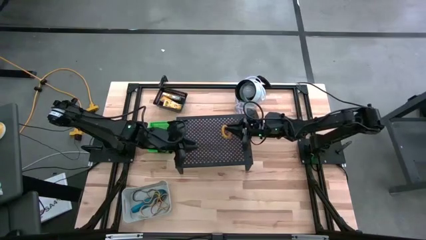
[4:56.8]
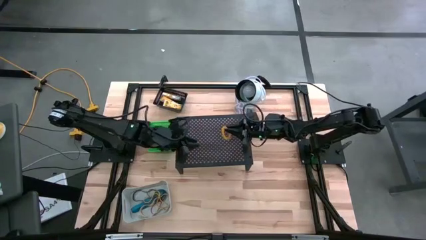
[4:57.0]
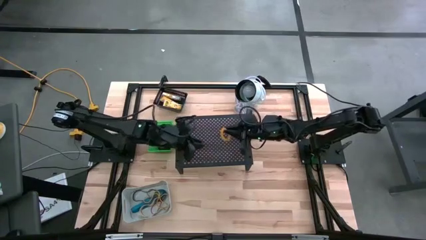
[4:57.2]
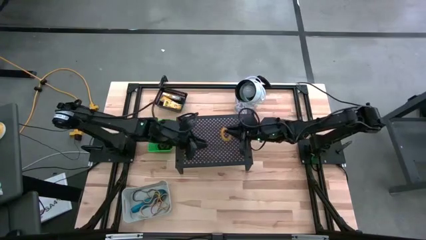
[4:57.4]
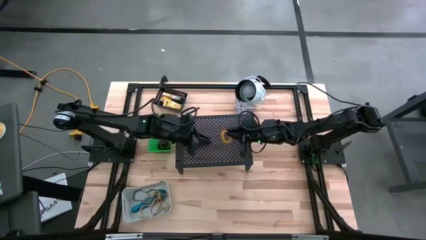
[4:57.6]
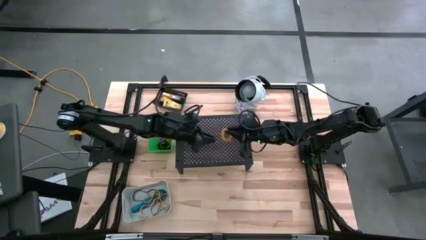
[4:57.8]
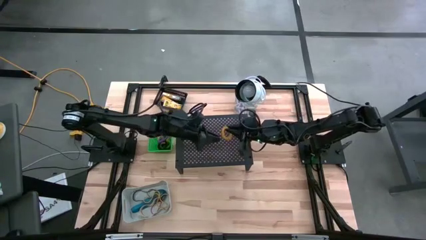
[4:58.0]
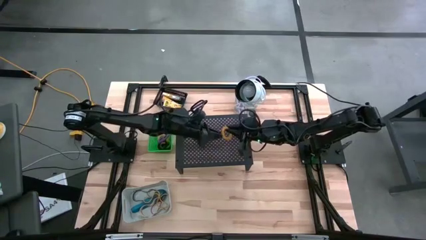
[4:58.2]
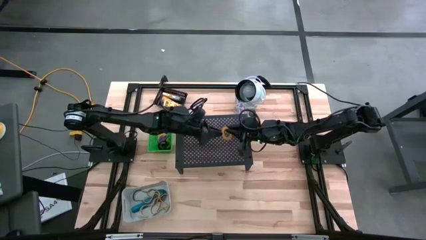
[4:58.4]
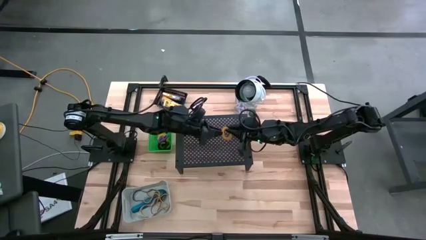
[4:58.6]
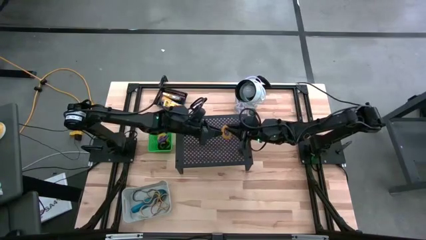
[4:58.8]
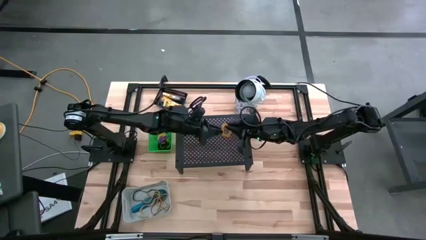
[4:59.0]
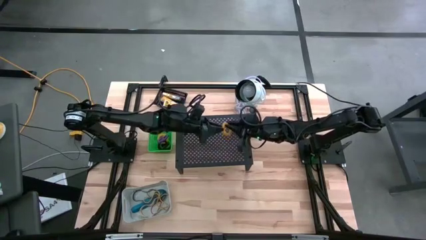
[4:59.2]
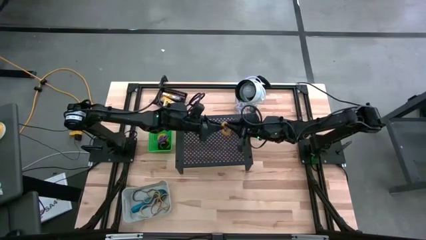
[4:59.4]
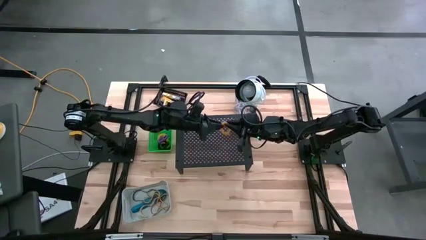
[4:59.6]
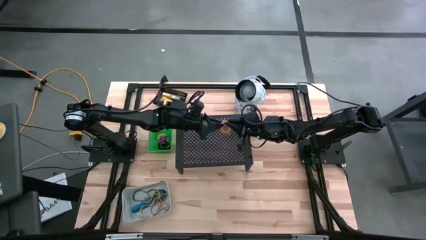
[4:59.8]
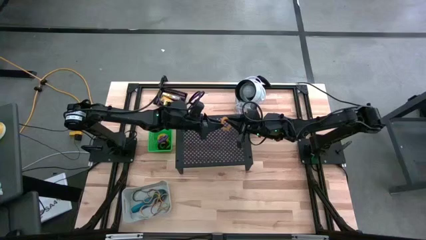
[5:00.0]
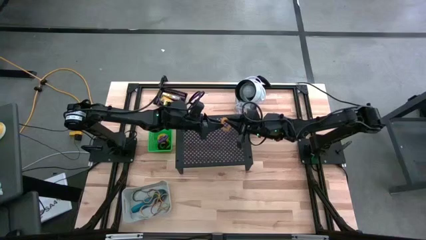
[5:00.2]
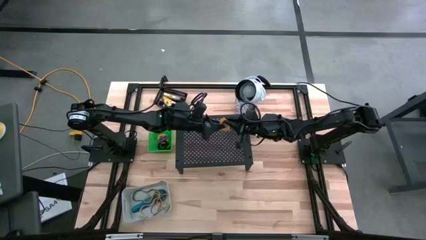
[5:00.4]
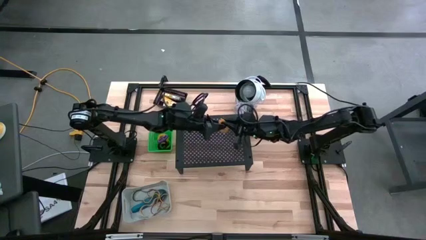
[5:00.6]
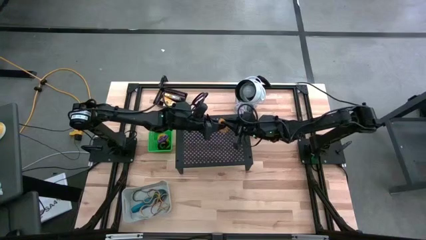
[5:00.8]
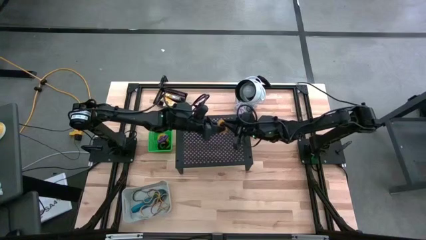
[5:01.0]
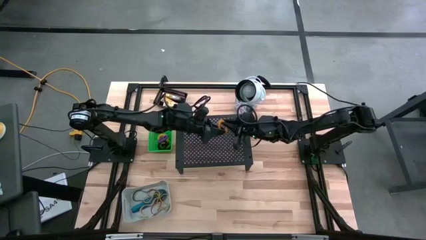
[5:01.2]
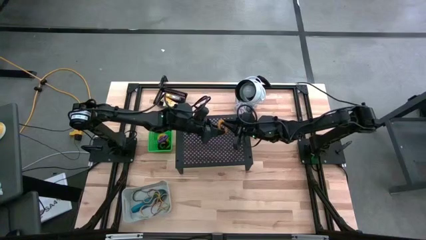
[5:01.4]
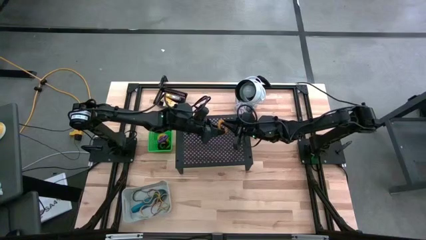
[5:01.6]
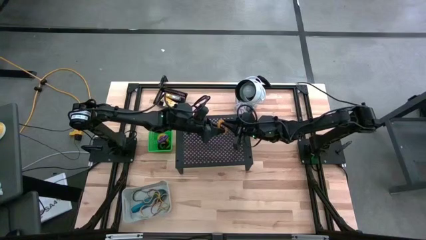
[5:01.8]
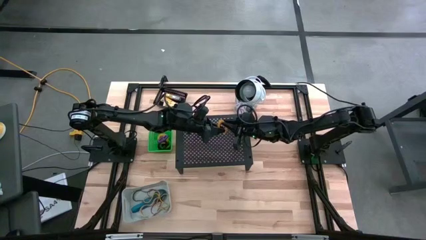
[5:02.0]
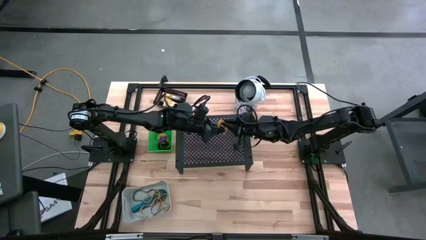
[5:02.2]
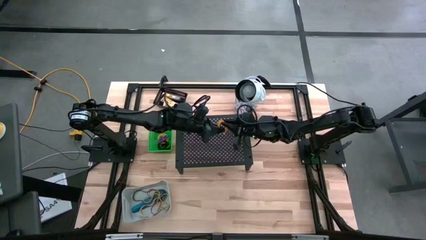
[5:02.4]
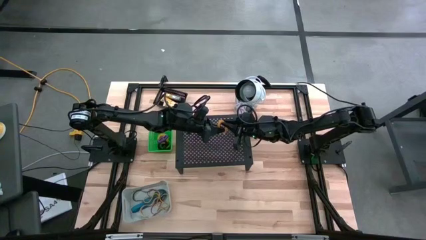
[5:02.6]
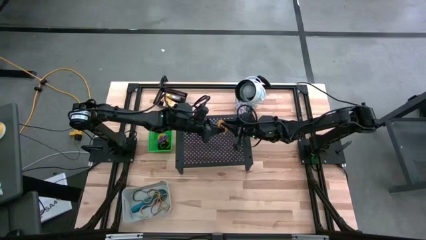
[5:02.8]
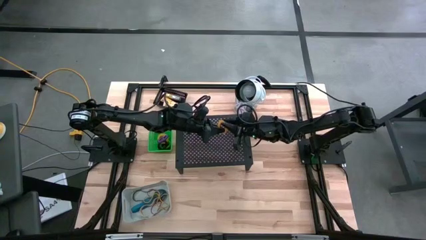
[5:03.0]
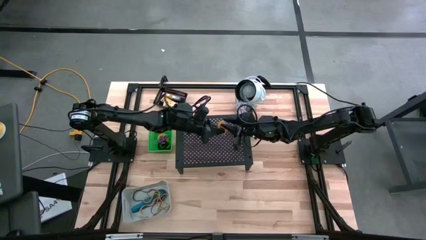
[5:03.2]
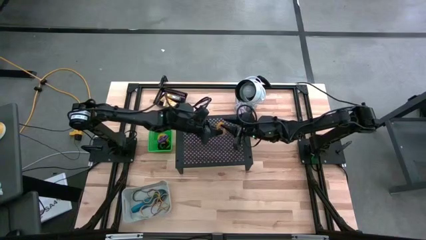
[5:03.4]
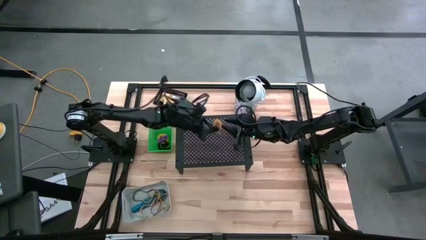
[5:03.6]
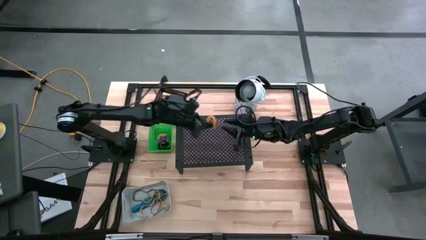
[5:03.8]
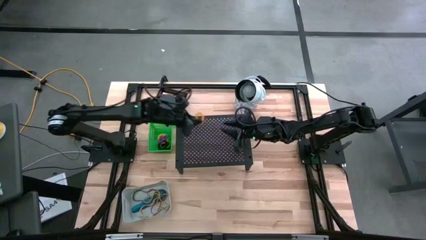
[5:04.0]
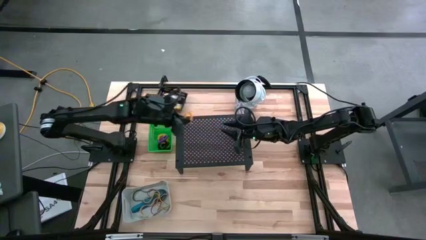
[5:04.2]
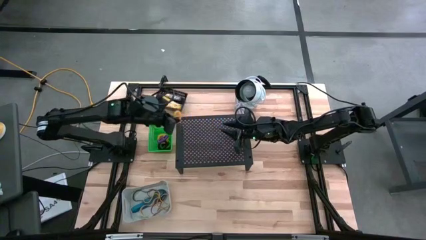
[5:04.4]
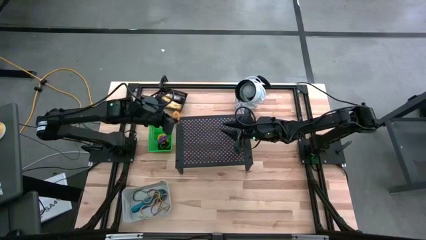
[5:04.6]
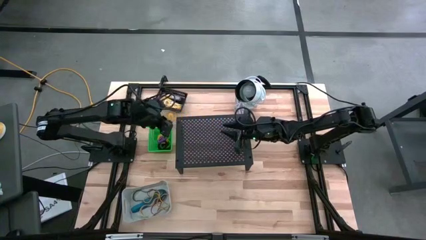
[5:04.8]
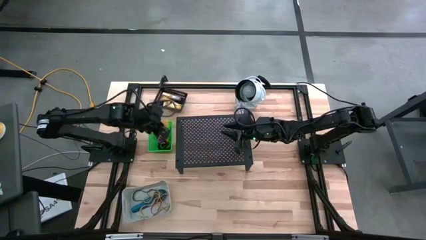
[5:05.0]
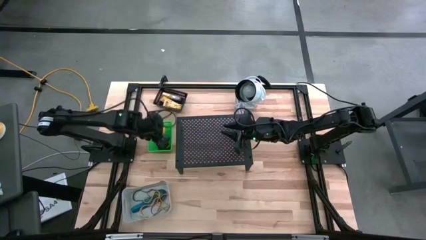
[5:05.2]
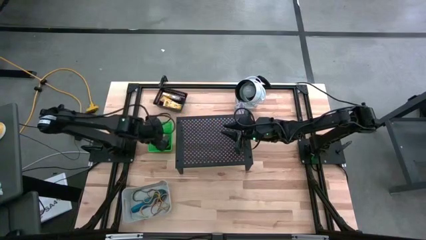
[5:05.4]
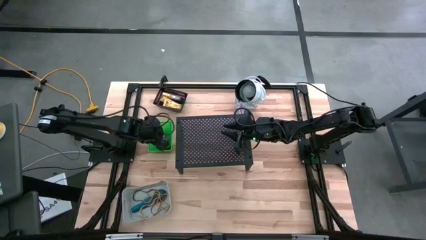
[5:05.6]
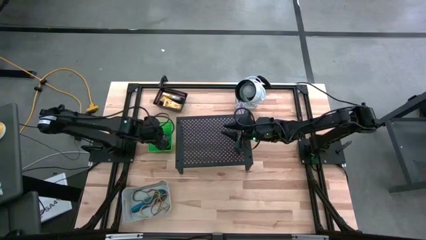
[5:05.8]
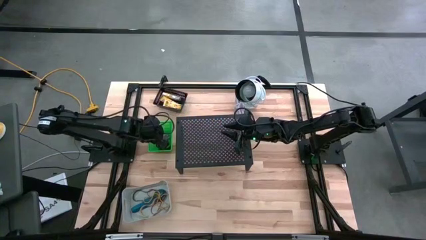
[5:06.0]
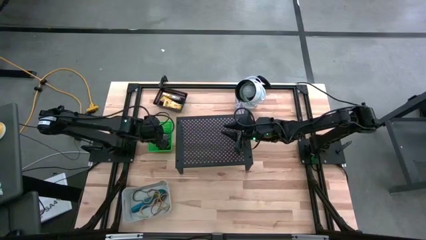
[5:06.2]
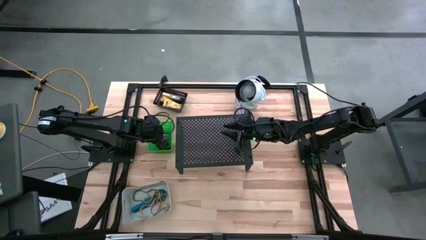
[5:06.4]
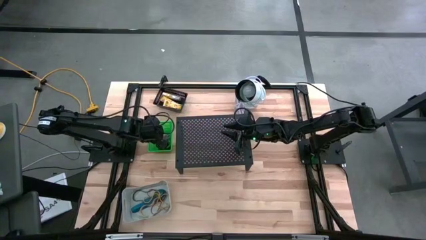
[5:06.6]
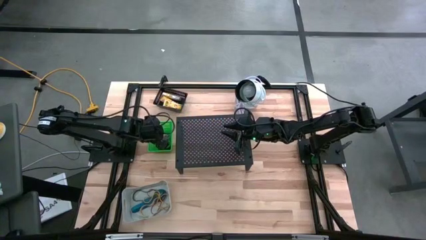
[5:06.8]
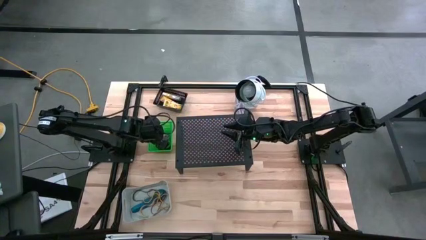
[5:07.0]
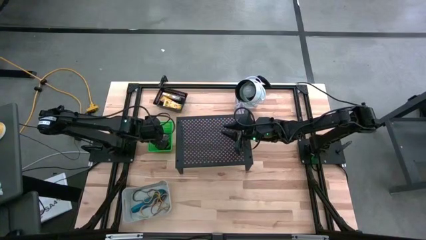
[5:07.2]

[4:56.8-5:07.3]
Task: Pick & Place Office Desk Supplies
Put the yellow spring keychain into the green bin

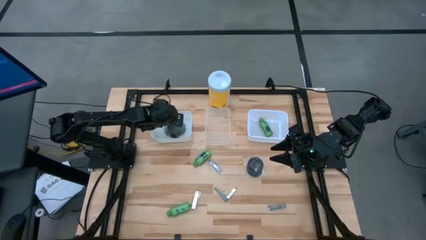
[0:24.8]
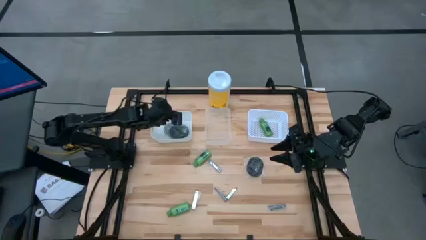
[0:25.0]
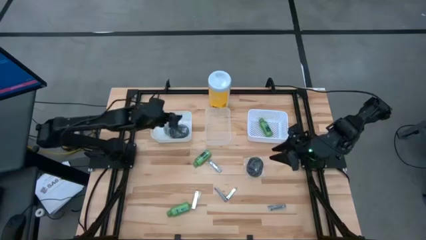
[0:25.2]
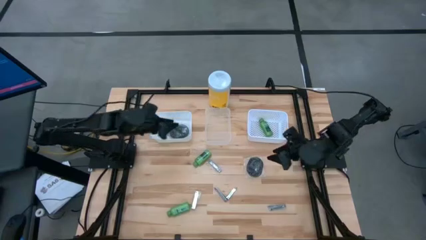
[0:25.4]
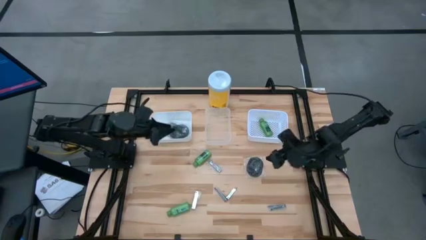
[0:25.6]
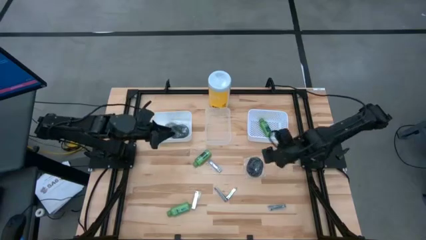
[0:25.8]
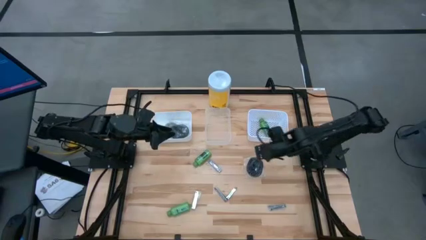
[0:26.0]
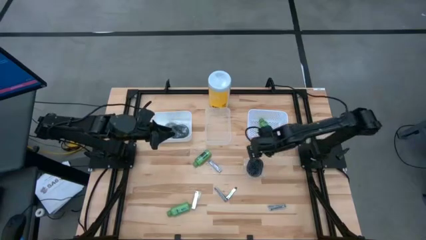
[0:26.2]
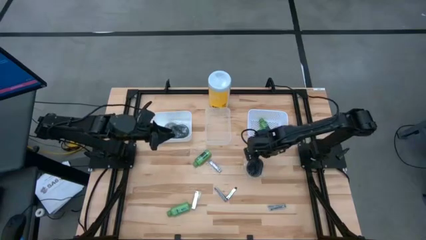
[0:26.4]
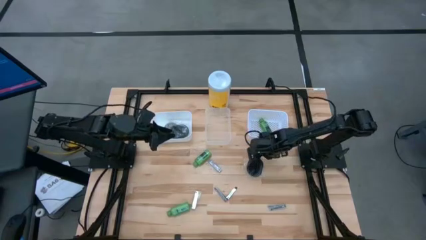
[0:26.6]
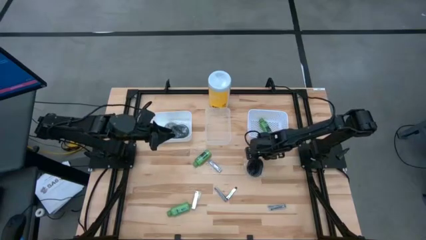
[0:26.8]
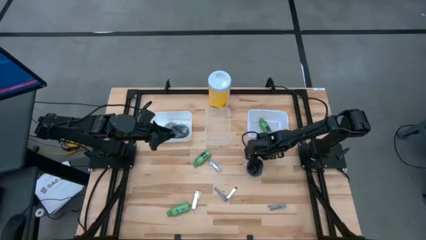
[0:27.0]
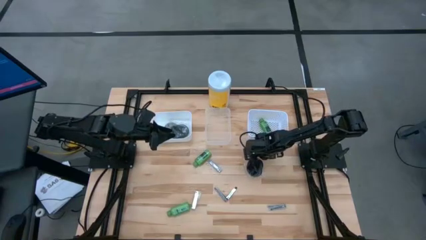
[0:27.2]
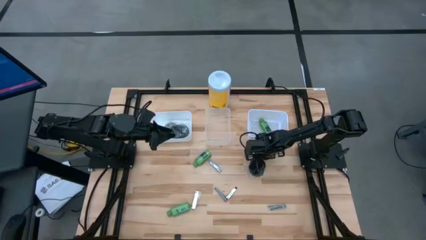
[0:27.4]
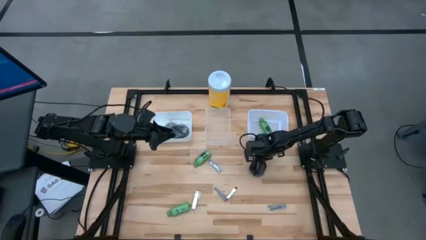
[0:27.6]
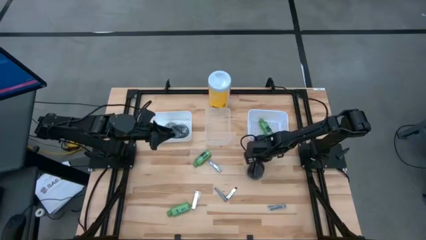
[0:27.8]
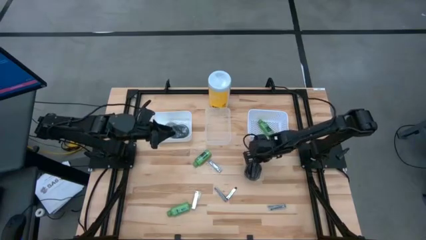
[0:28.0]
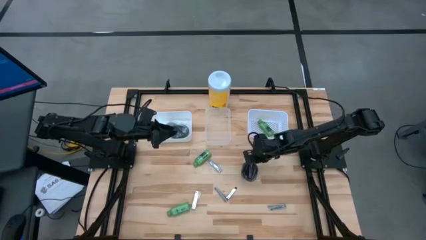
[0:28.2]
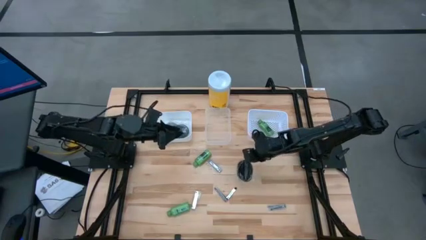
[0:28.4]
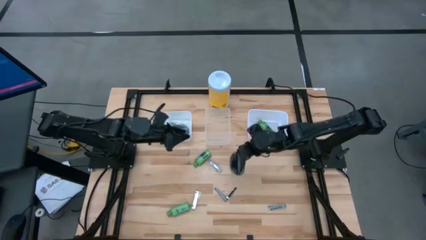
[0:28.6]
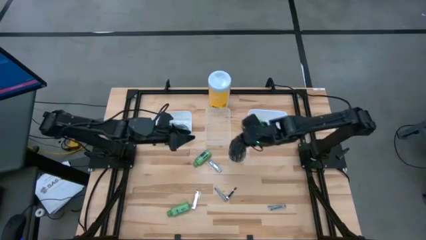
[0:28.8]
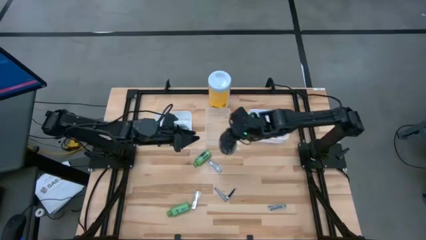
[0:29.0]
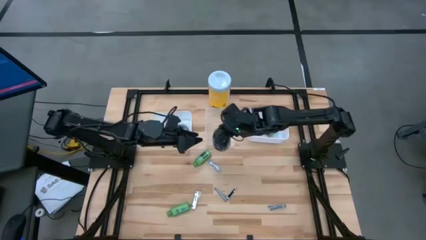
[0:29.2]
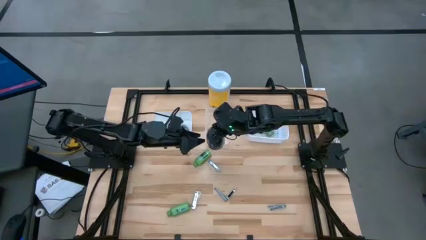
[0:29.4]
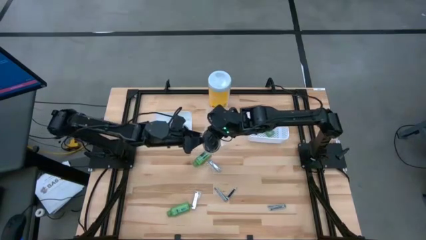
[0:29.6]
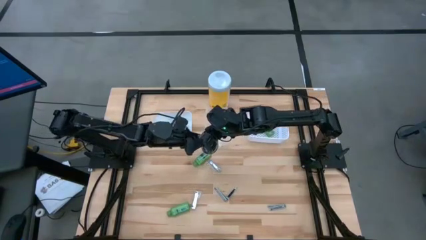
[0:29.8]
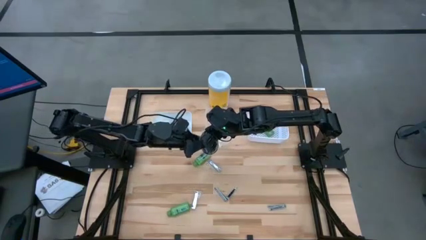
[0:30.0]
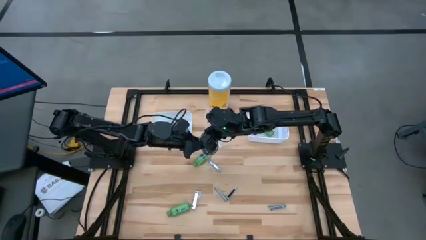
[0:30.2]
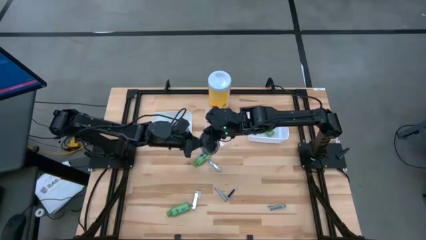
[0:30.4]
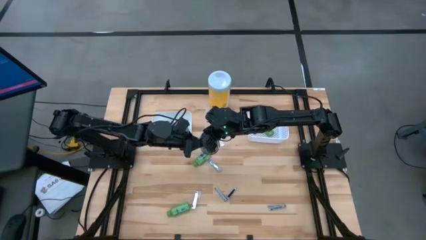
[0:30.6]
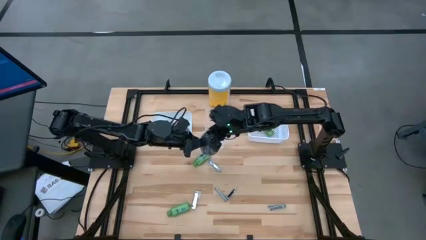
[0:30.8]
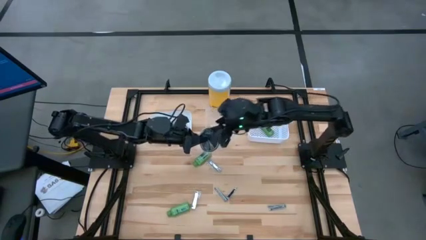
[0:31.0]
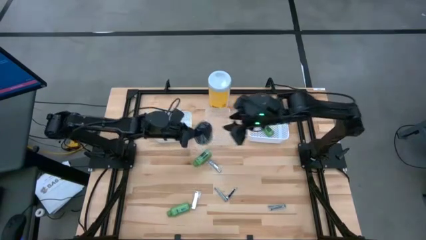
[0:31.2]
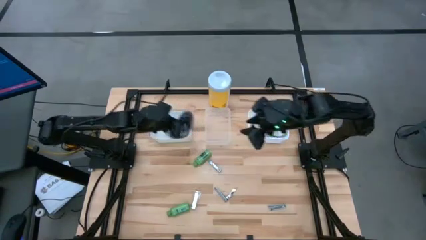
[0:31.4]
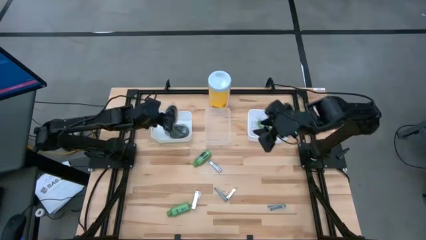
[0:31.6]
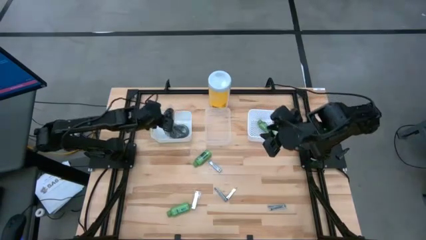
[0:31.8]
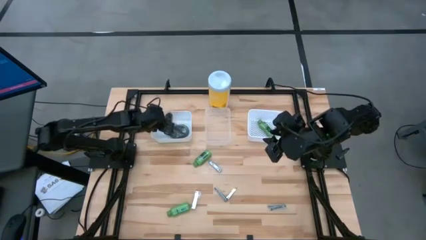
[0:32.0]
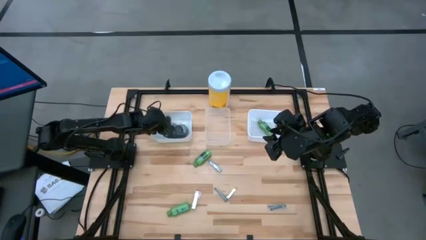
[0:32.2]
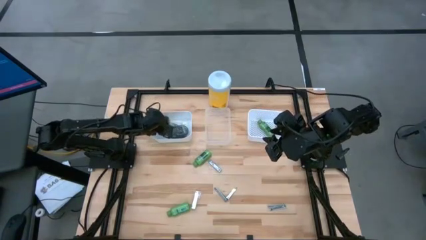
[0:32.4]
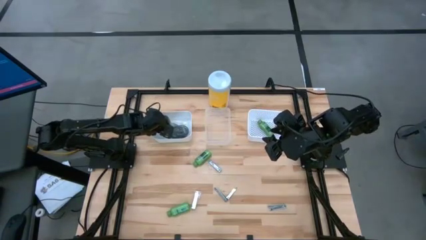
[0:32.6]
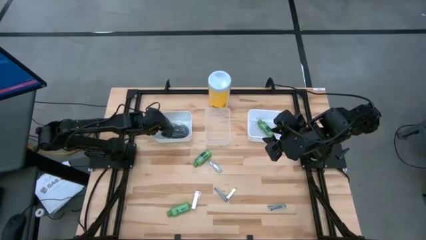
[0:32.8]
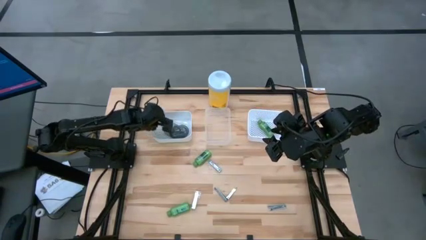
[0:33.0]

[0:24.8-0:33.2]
Task: Pick & Place Travel size toiletries
Put the black hairbrush into the left white bin
